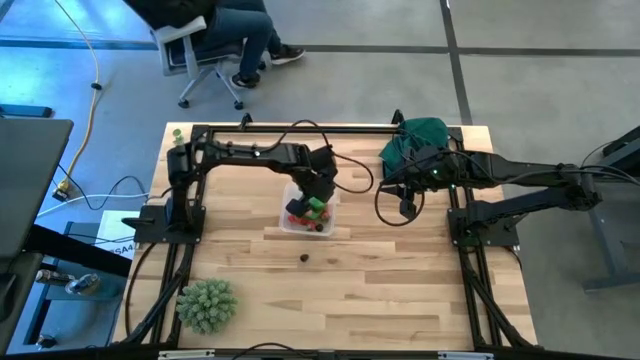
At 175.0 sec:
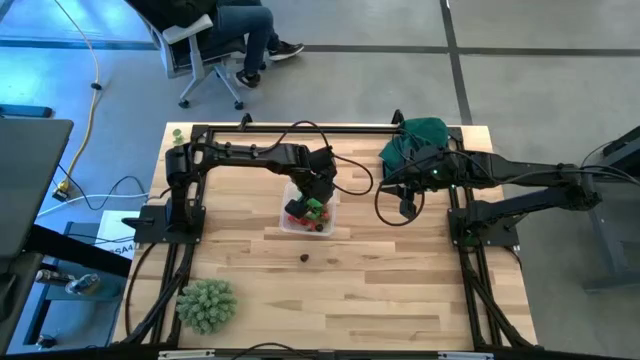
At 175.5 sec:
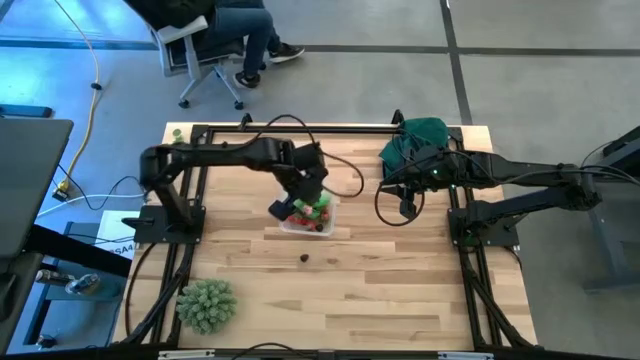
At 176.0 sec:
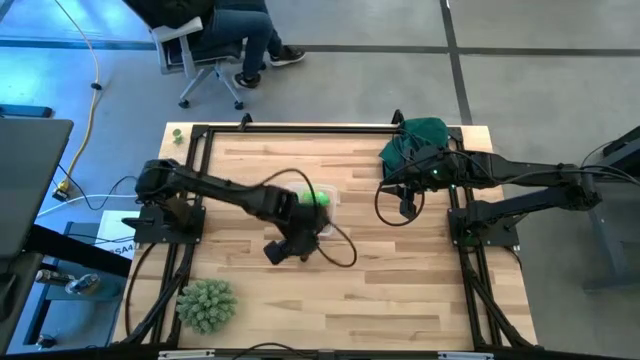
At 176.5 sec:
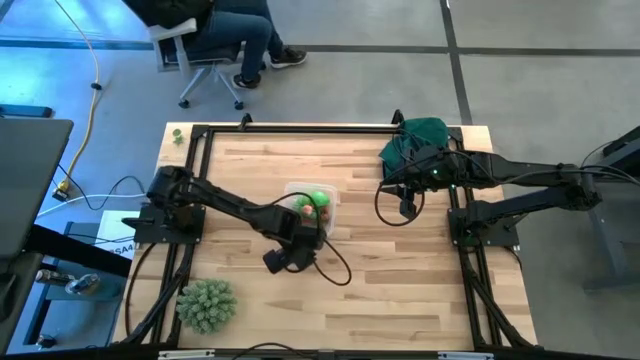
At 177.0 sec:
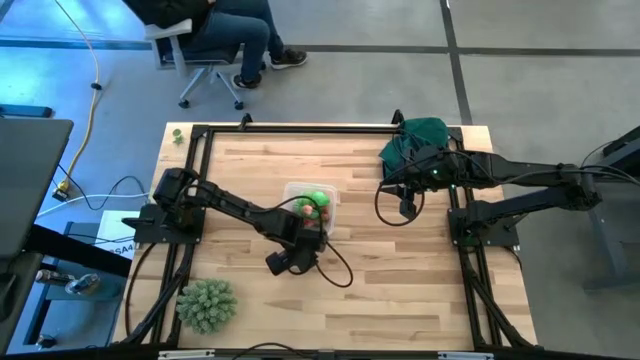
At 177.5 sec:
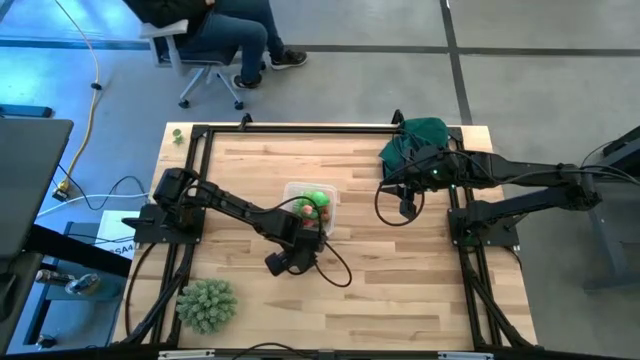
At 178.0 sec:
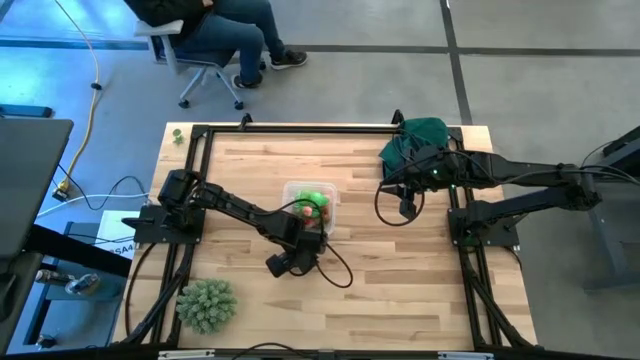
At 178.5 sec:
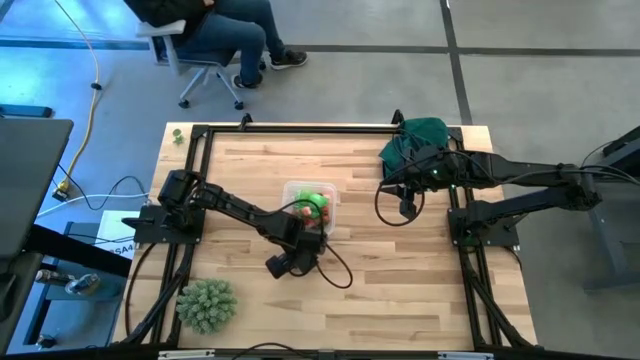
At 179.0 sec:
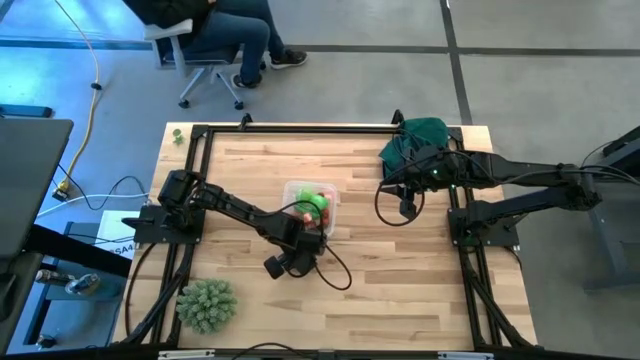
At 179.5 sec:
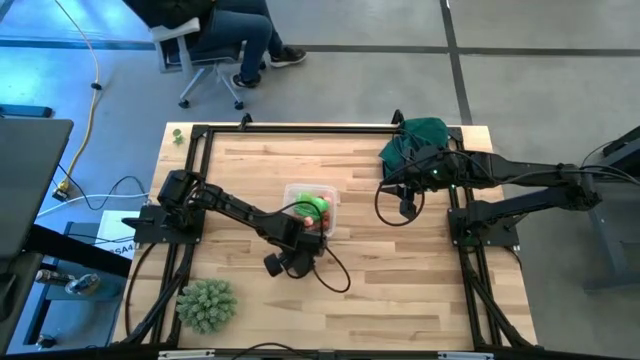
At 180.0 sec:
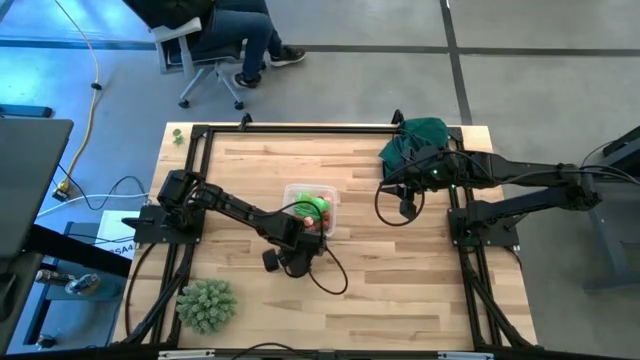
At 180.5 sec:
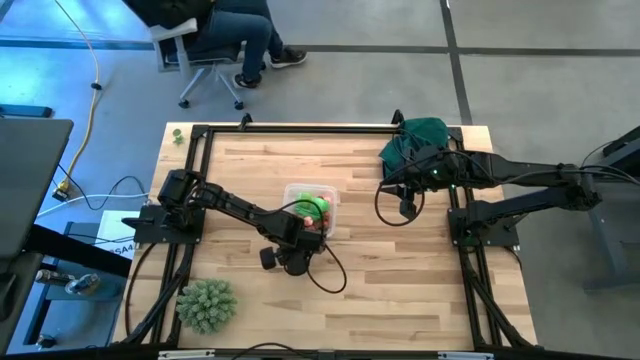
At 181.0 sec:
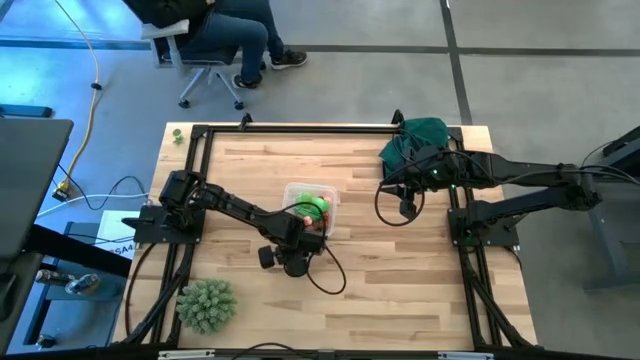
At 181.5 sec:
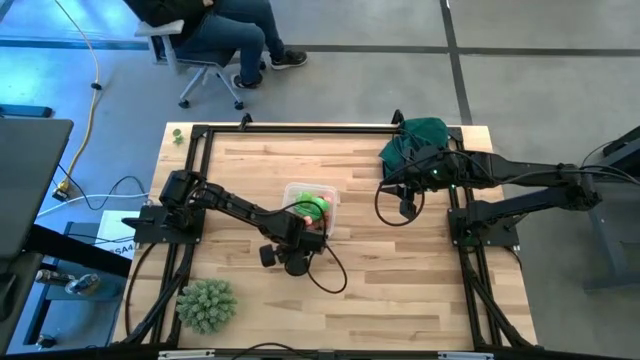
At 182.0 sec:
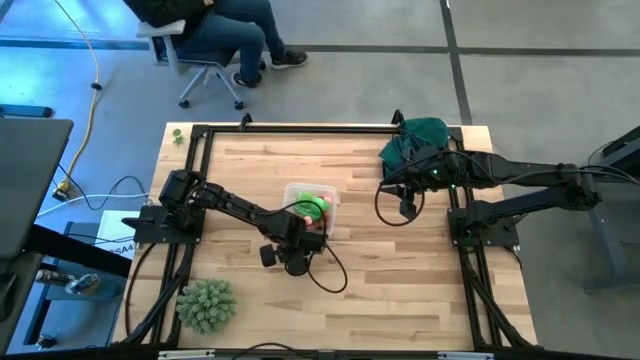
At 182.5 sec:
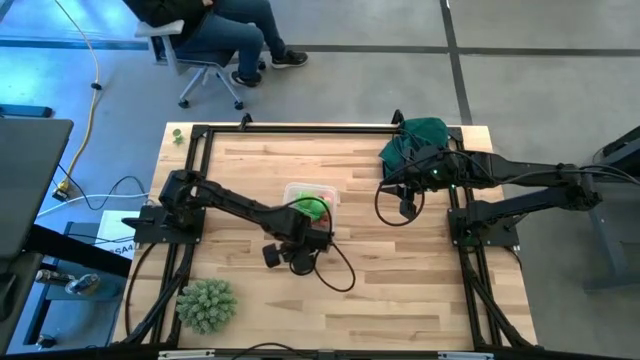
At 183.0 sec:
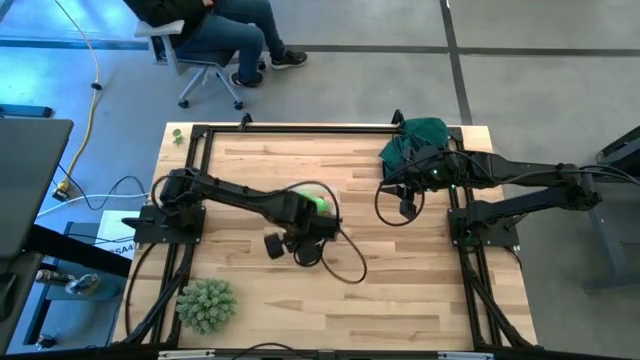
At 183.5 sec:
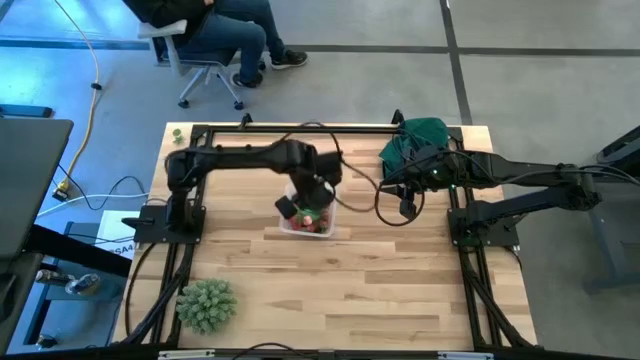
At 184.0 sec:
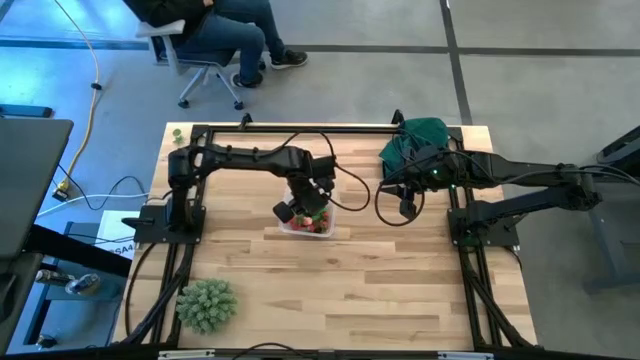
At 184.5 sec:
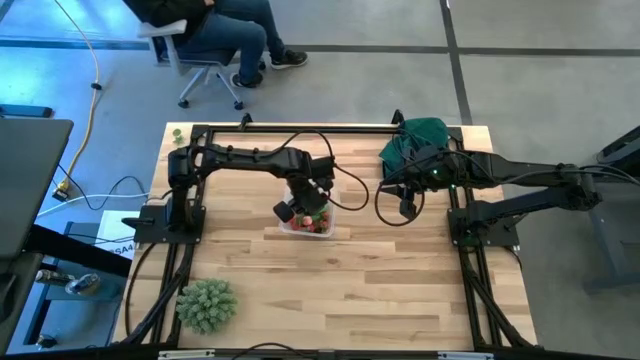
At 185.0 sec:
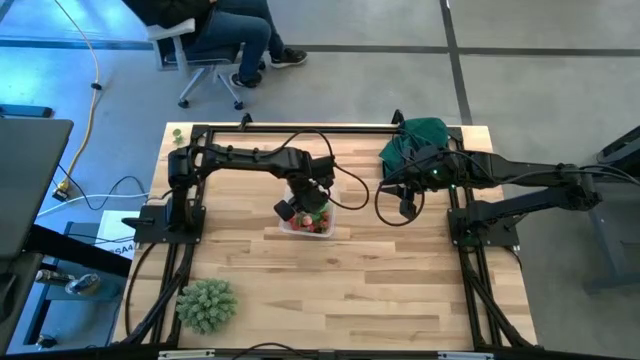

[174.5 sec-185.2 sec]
Task: Pick and placing Produce into tupperware
Put the blackberry into the transparent container

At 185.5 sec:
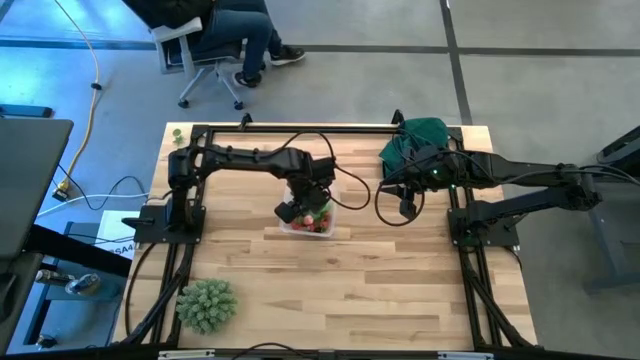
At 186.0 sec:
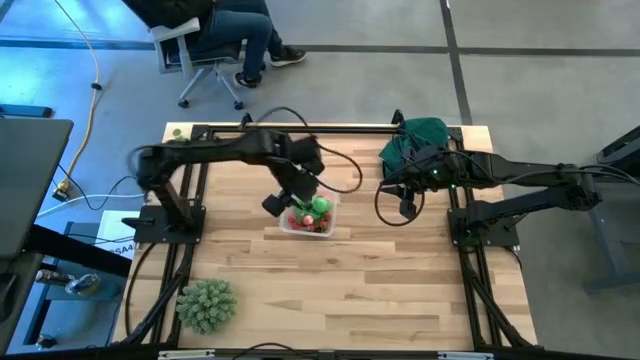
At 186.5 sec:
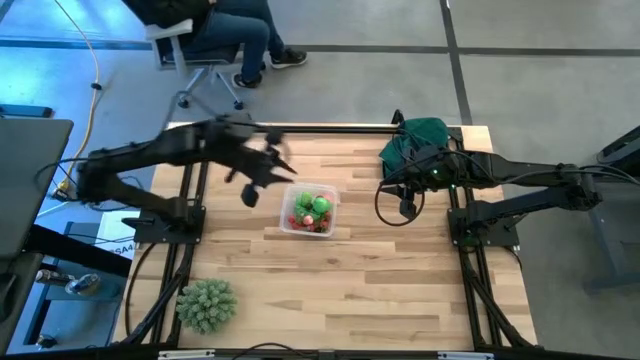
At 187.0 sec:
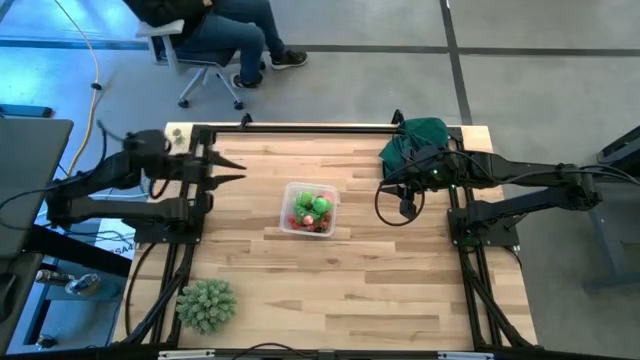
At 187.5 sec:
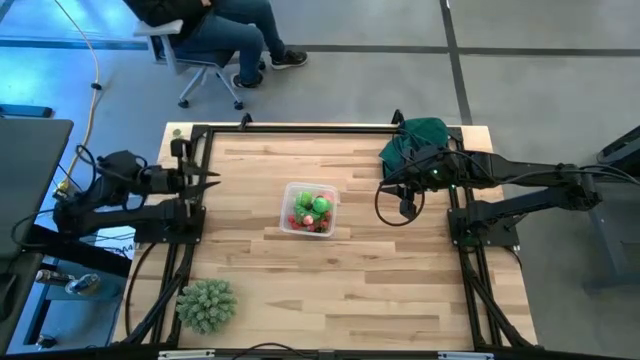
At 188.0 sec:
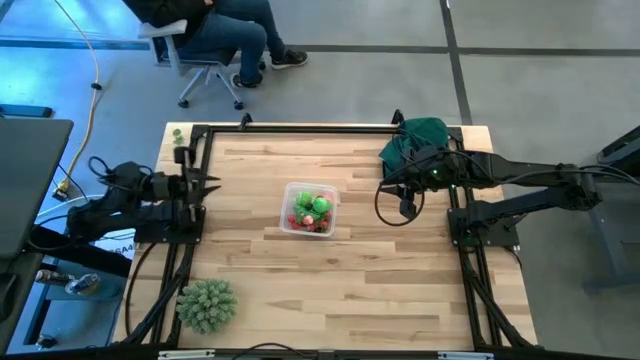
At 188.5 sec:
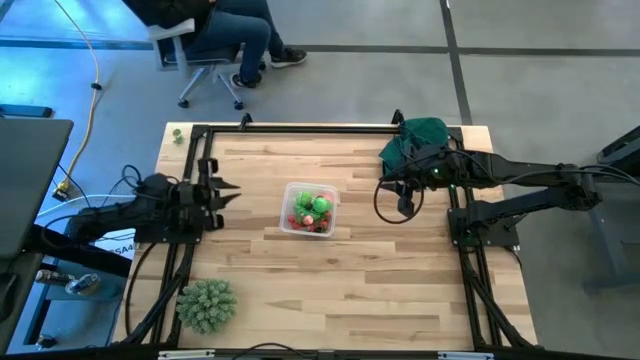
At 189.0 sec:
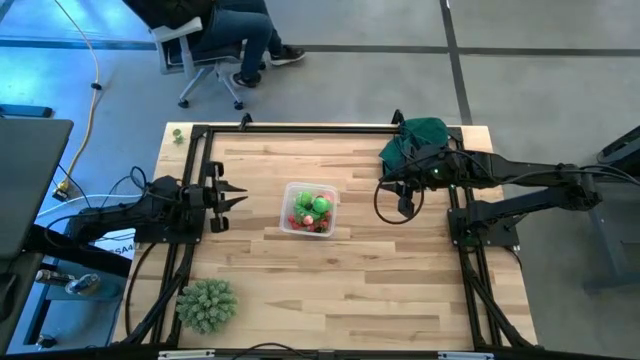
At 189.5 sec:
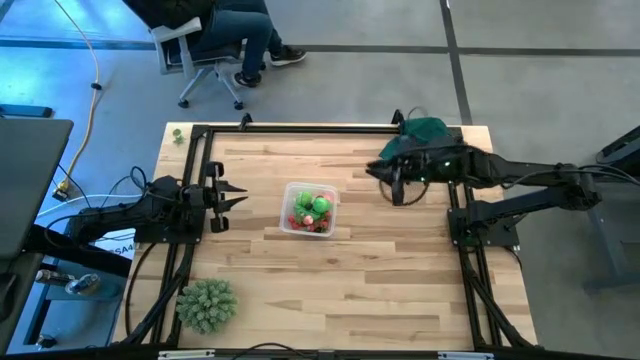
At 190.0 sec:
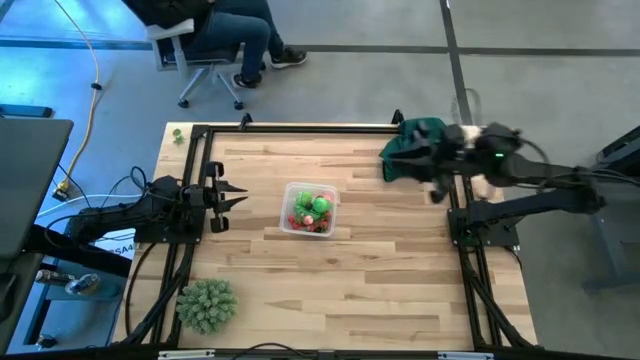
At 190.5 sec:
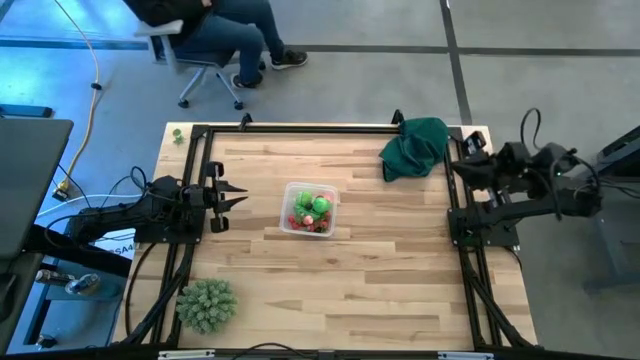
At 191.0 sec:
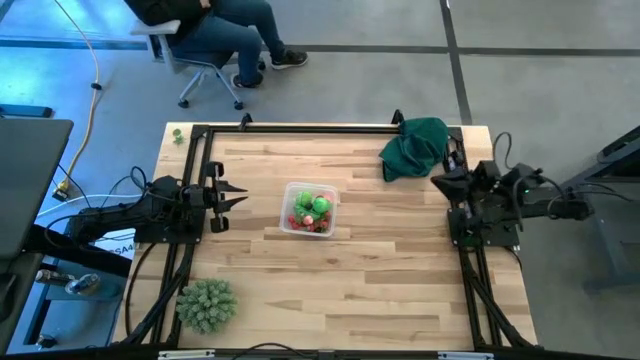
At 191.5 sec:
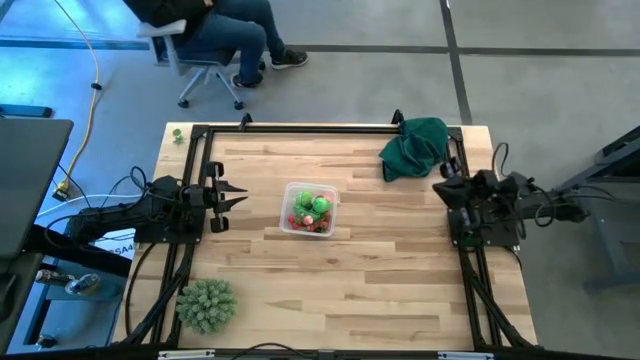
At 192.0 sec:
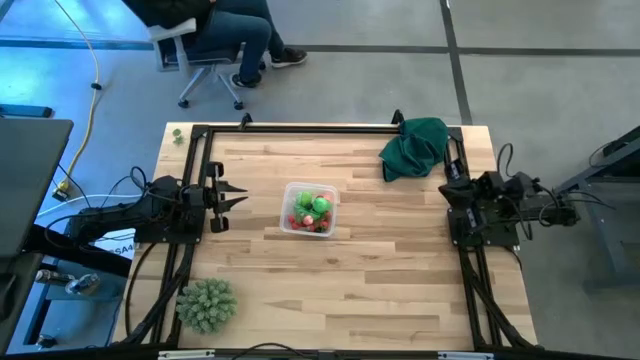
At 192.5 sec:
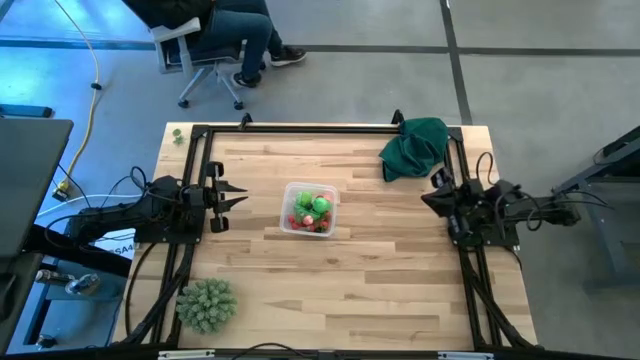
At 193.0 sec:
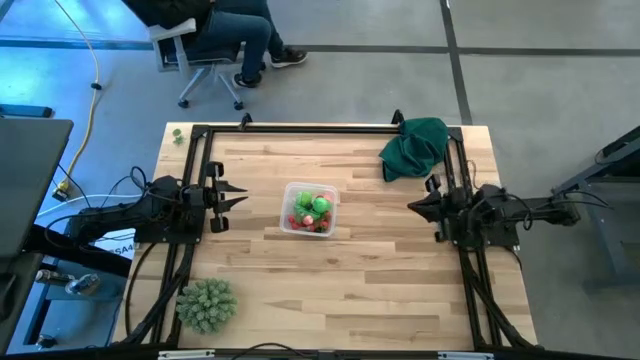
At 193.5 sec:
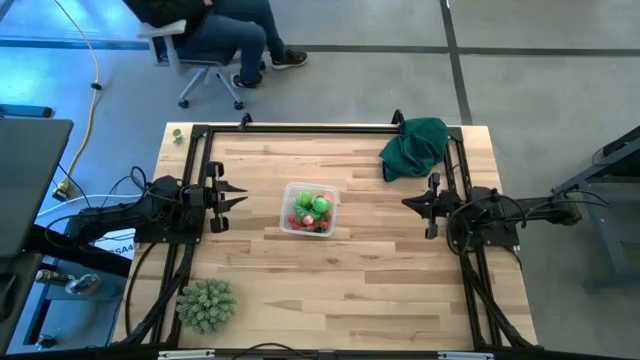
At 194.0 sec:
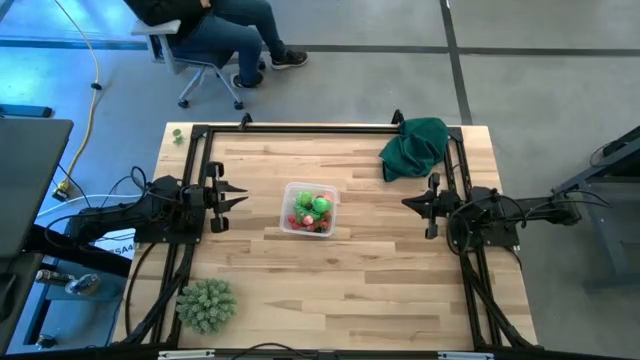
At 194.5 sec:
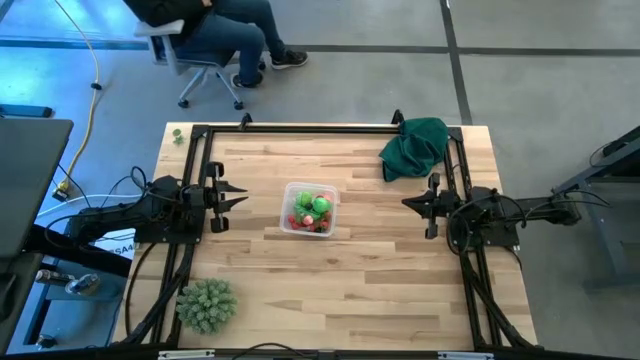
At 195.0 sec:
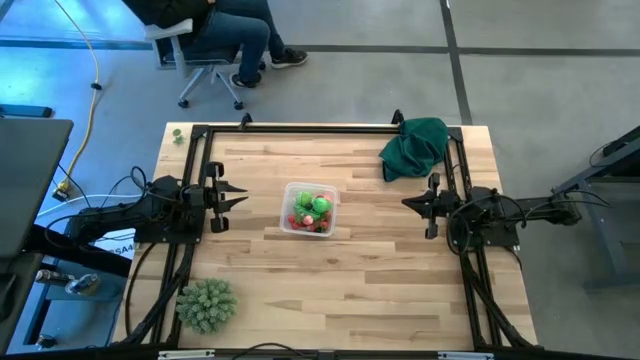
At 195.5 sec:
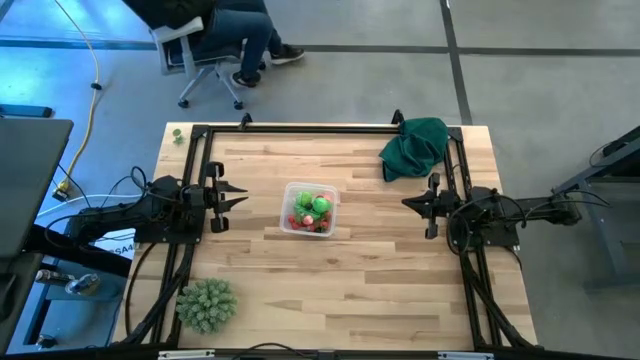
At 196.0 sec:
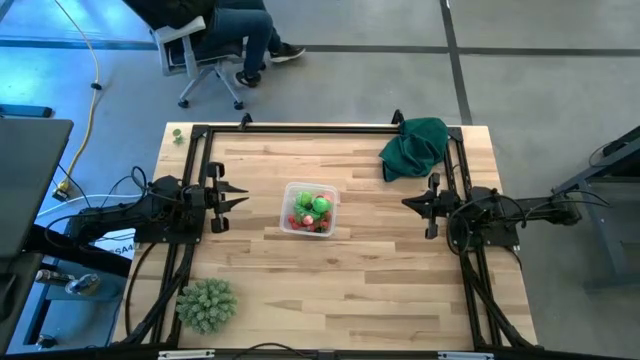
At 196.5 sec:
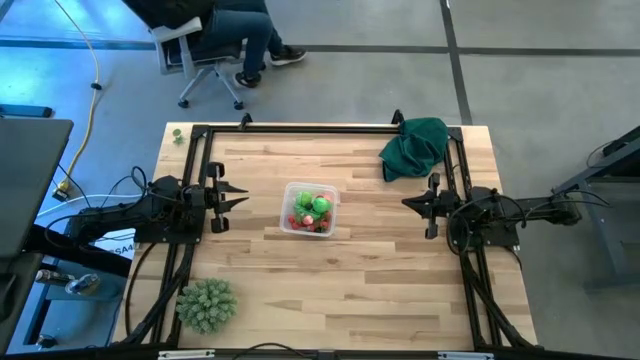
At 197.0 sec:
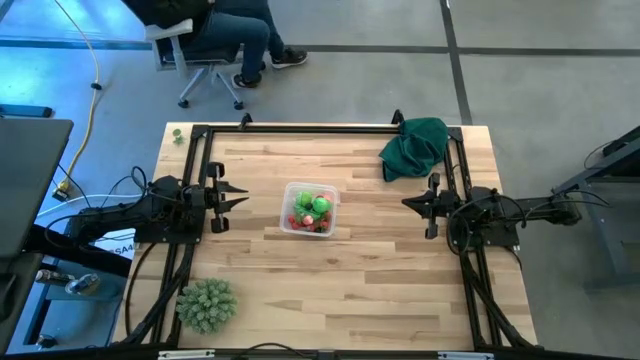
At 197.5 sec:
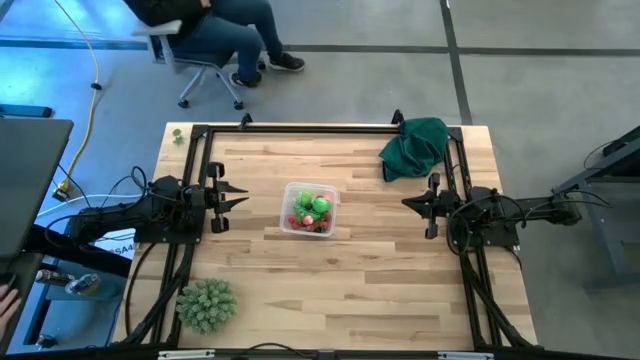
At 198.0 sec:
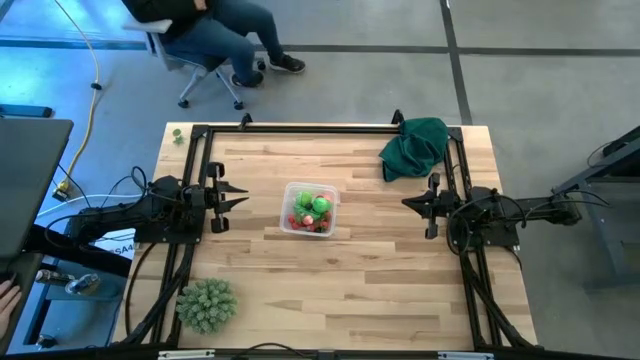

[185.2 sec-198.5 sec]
Return to Home Position
